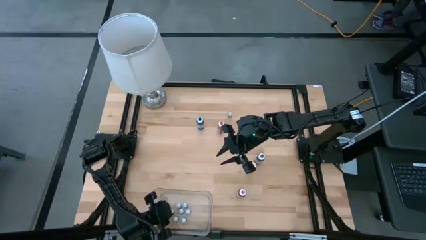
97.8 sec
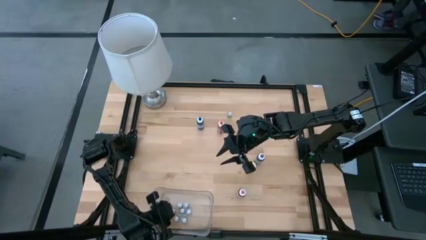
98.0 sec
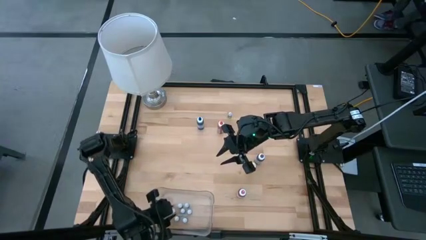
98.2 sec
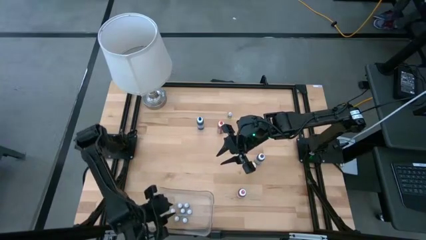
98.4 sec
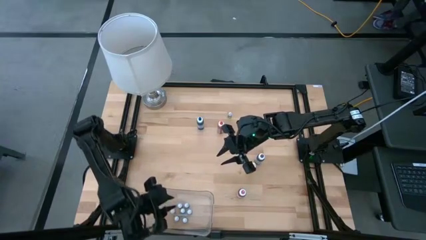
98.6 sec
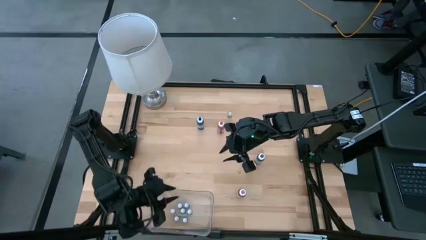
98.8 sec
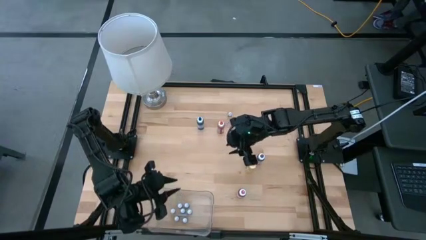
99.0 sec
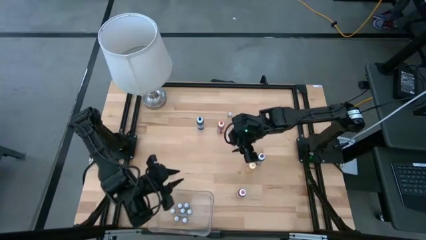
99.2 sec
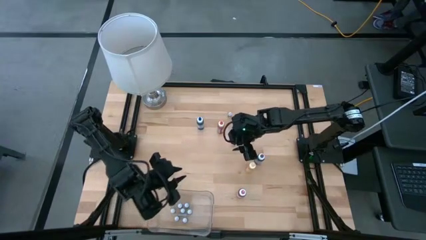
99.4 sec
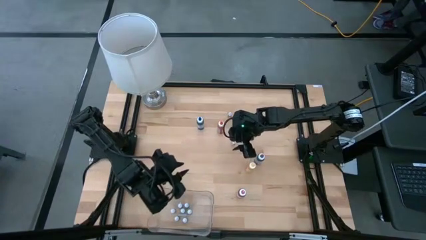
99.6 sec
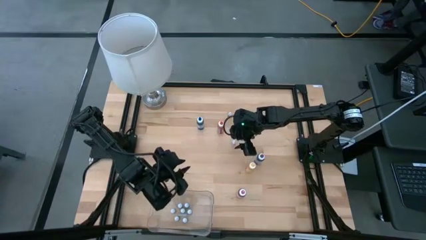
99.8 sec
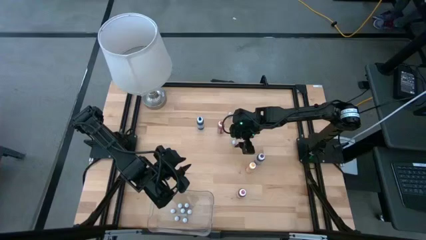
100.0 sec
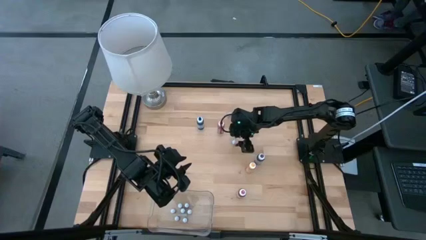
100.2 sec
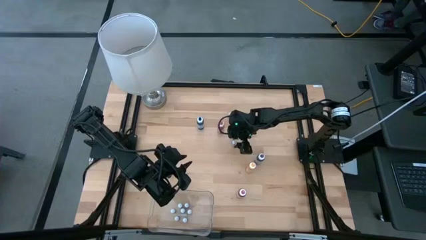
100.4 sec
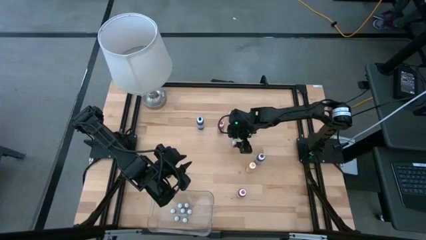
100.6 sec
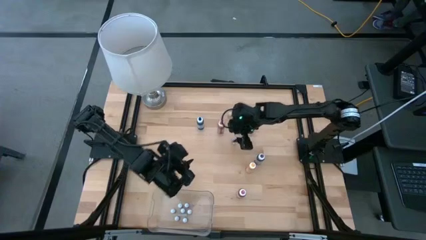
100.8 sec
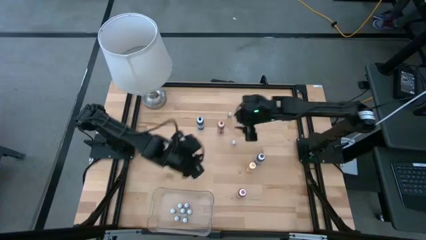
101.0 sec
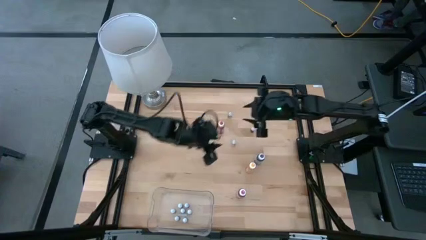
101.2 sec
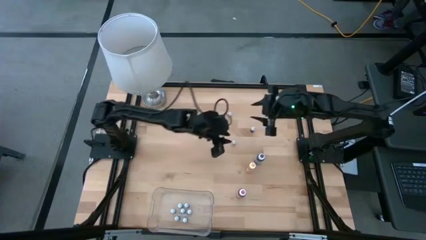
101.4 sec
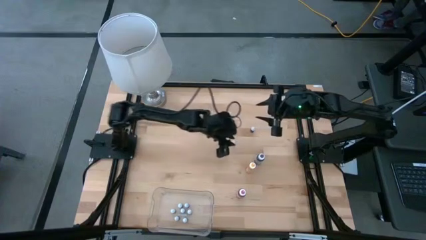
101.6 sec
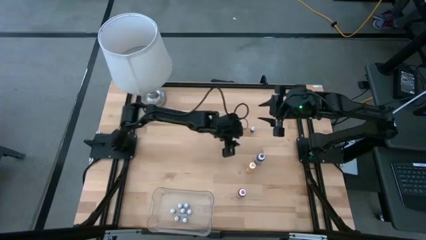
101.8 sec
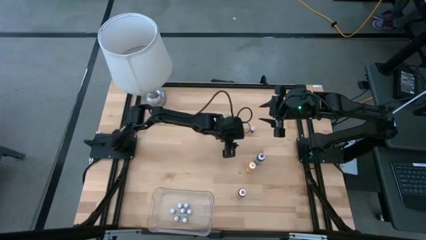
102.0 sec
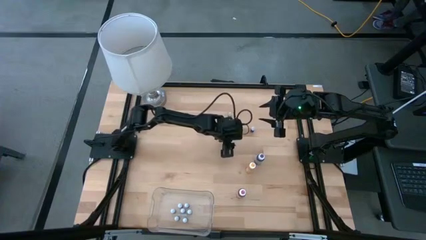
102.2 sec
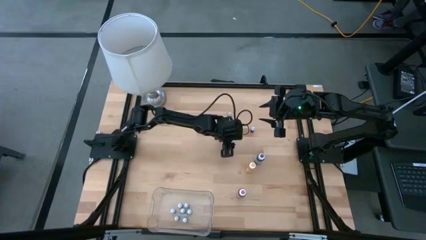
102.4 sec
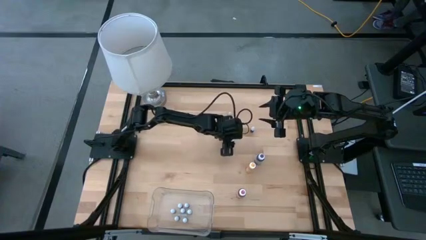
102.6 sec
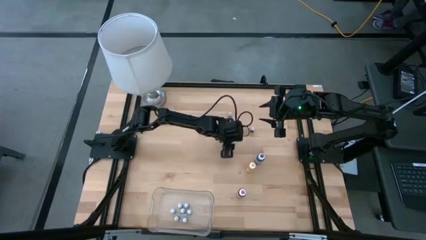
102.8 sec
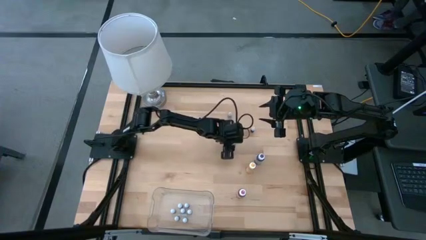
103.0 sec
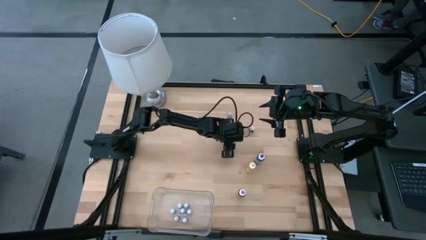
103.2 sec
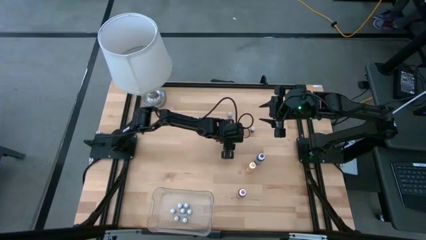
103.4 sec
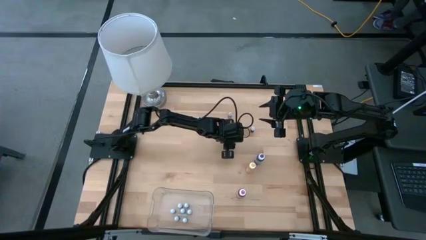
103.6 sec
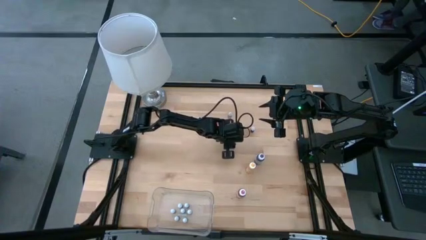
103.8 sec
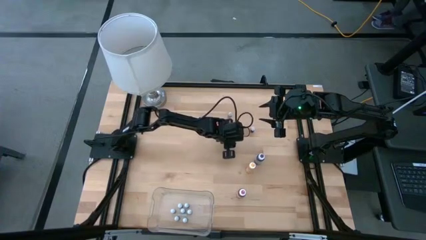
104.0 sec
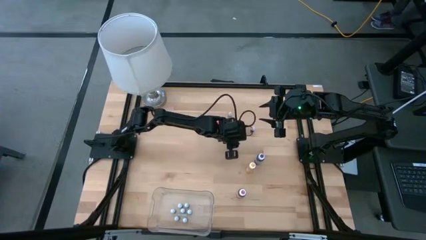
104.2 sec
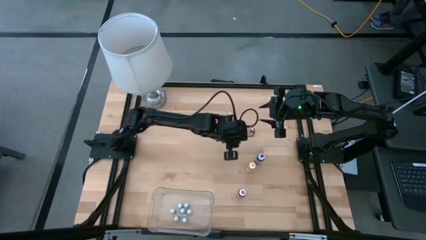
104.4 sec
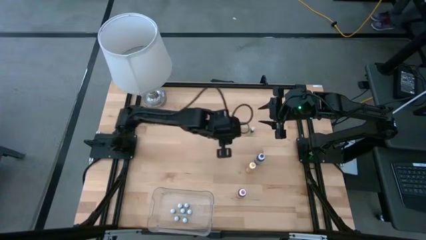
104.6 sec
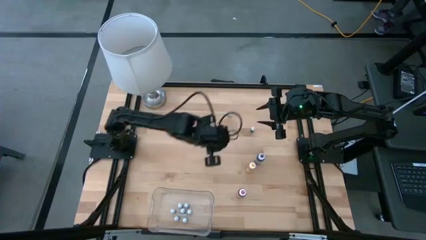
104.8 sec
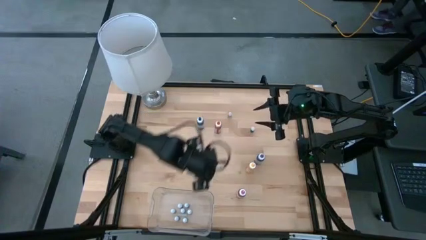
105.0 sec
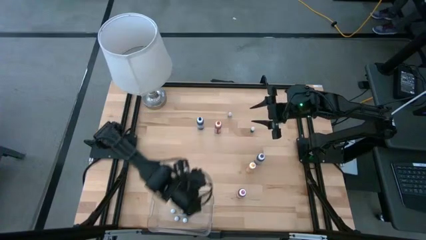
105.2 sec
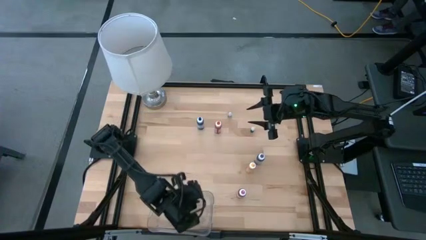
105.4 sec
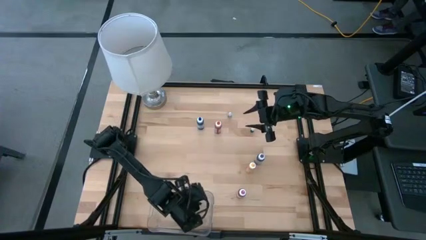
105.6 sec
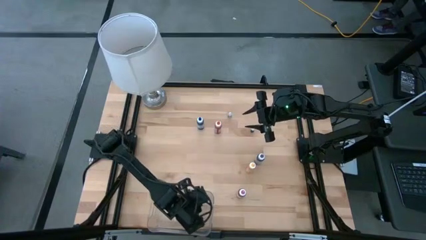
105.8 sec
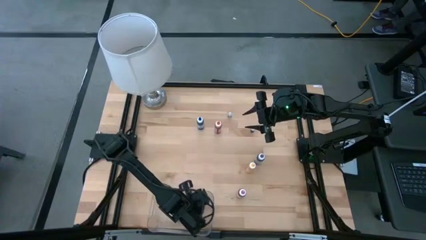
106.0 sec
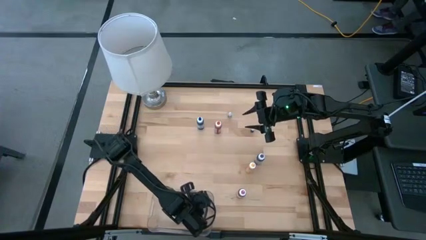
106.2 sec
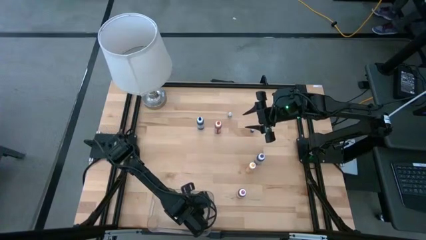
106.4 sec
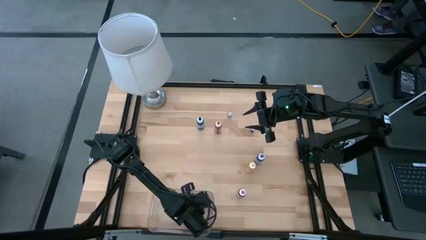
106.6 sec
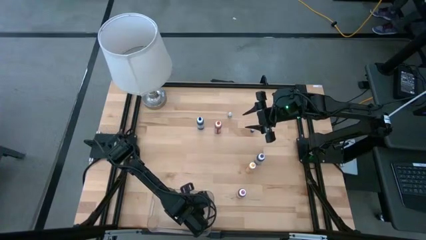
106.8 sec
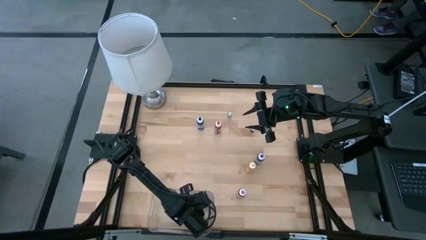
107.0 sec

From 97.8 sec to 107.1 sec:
Task: Pick & Place food coloring
Put the small blue food coloring bottle into the bin

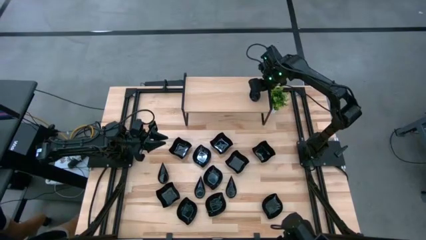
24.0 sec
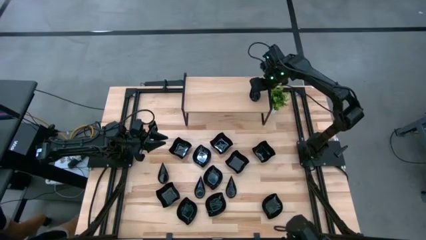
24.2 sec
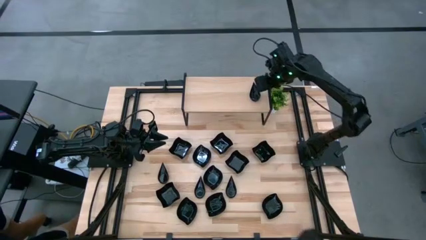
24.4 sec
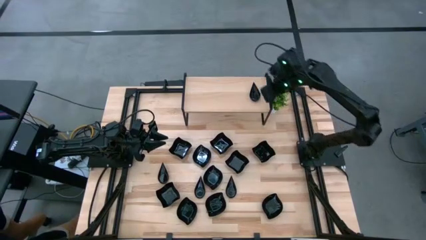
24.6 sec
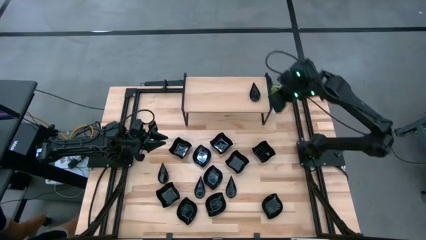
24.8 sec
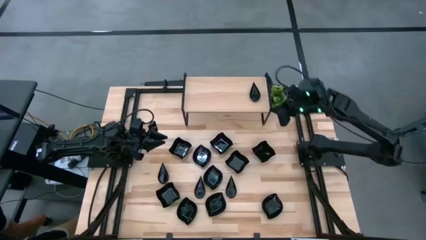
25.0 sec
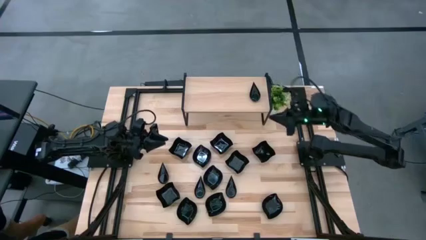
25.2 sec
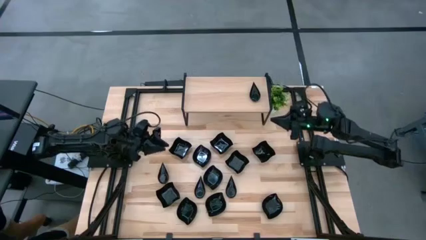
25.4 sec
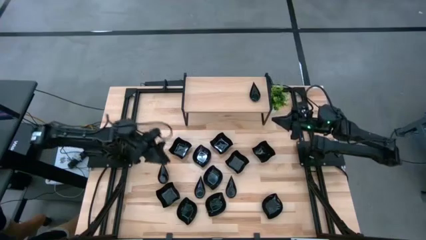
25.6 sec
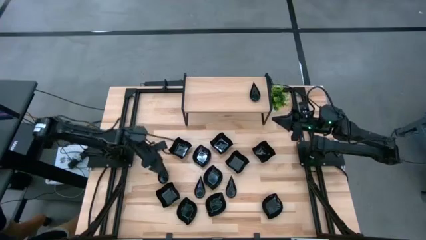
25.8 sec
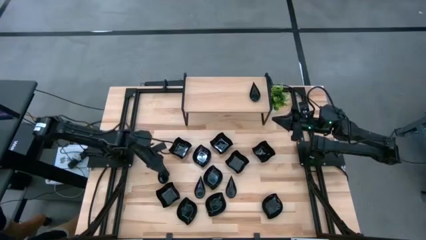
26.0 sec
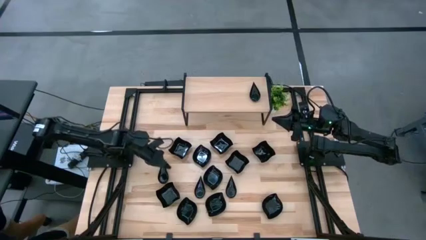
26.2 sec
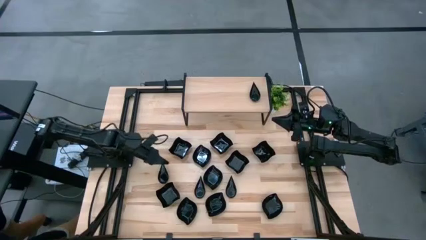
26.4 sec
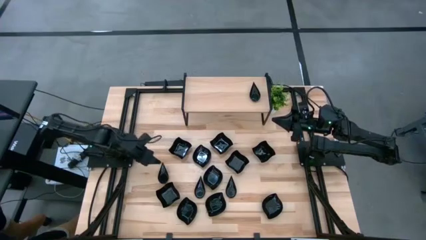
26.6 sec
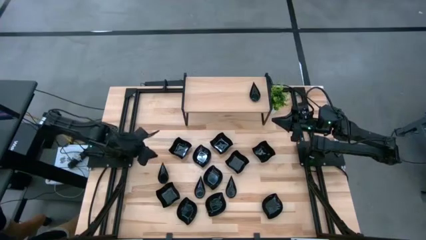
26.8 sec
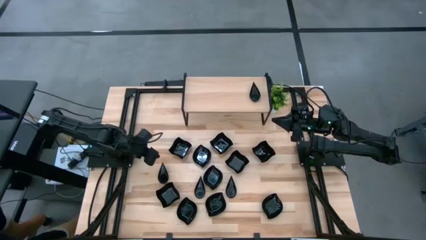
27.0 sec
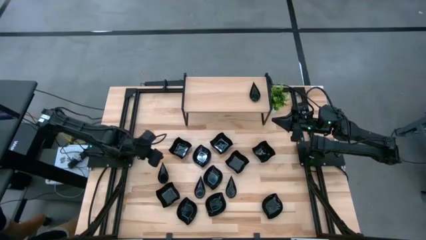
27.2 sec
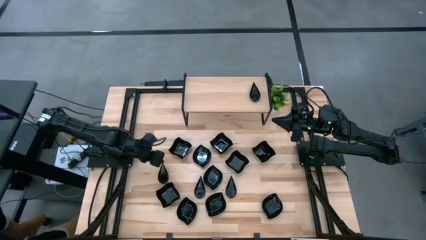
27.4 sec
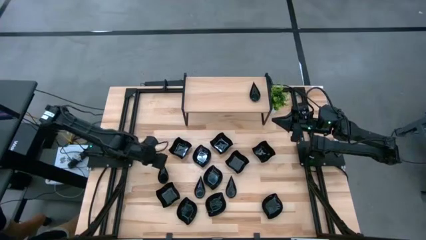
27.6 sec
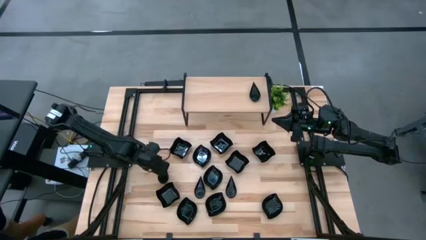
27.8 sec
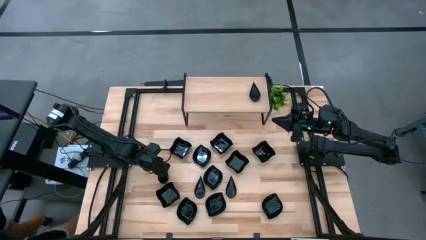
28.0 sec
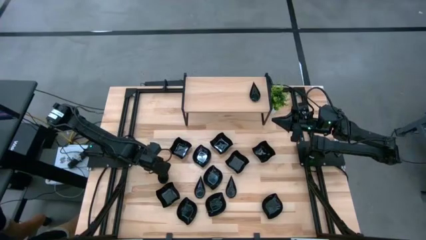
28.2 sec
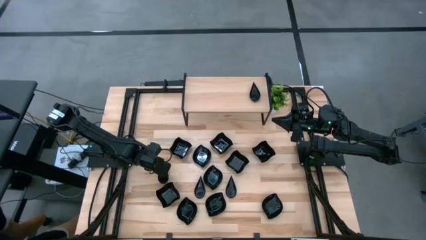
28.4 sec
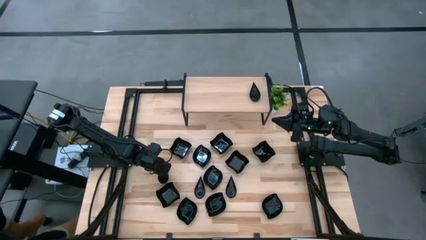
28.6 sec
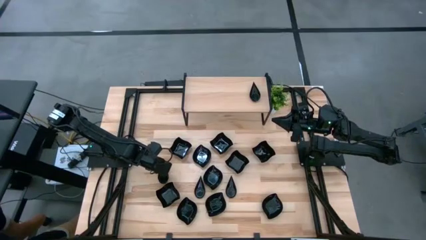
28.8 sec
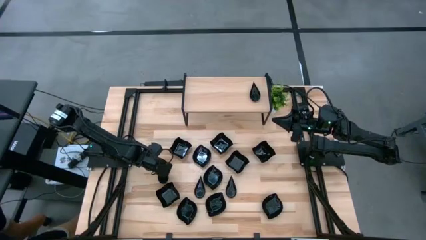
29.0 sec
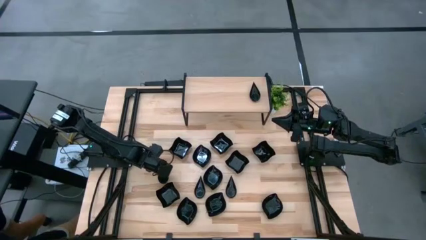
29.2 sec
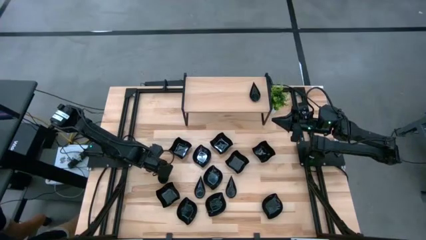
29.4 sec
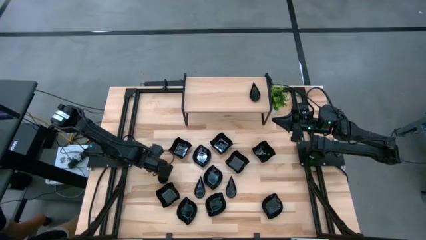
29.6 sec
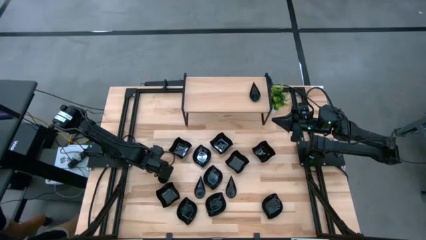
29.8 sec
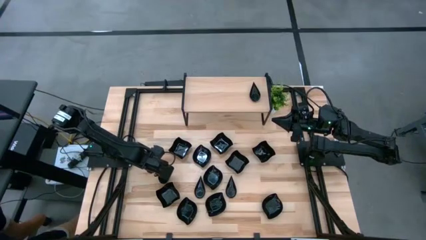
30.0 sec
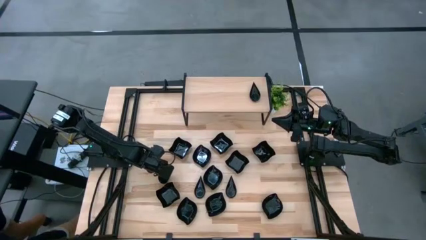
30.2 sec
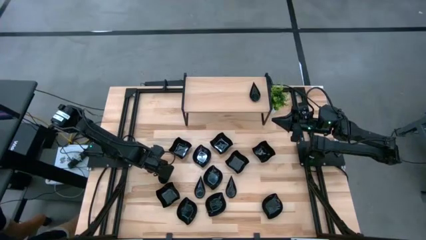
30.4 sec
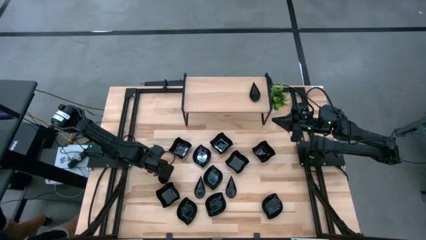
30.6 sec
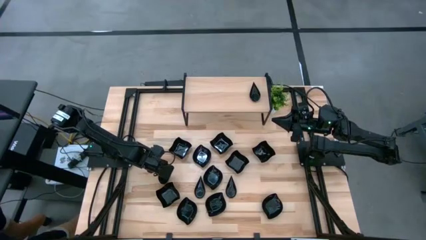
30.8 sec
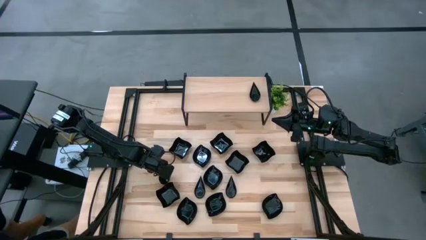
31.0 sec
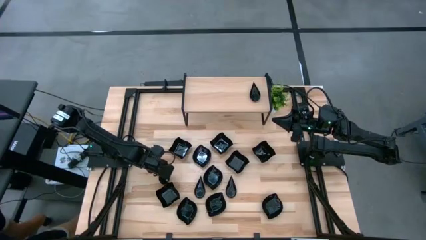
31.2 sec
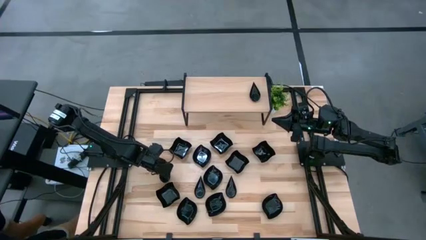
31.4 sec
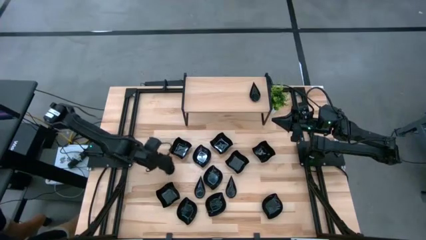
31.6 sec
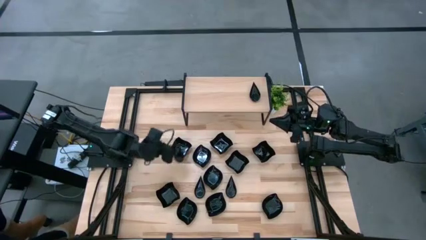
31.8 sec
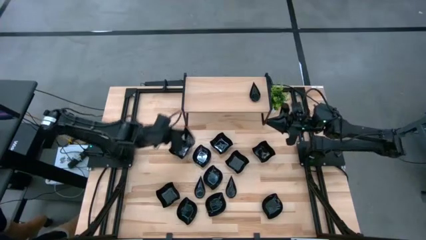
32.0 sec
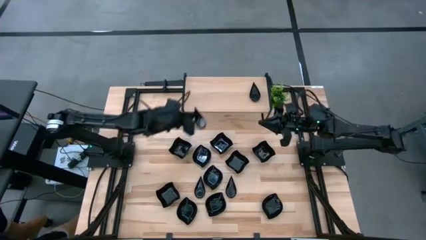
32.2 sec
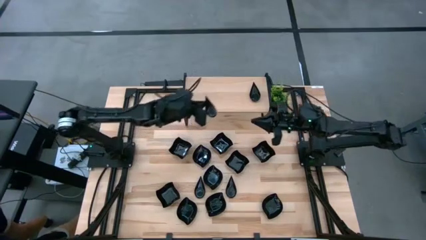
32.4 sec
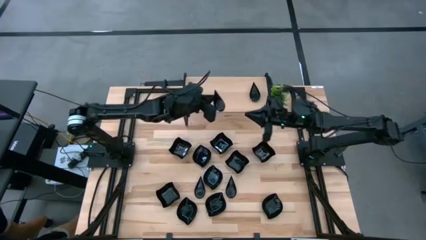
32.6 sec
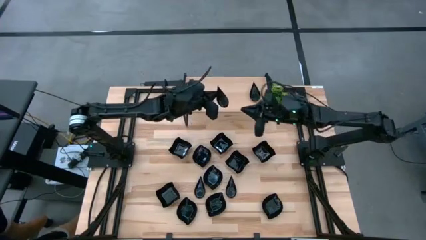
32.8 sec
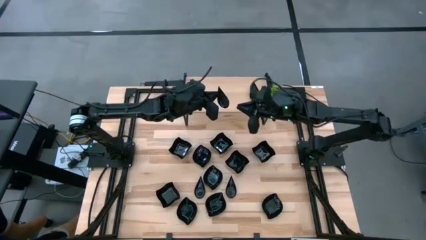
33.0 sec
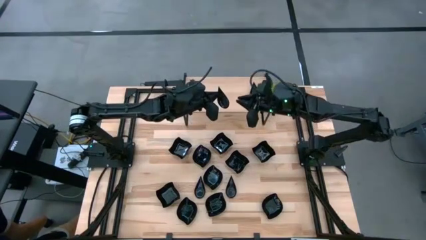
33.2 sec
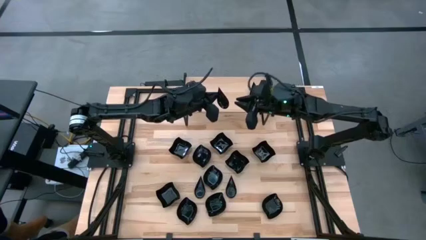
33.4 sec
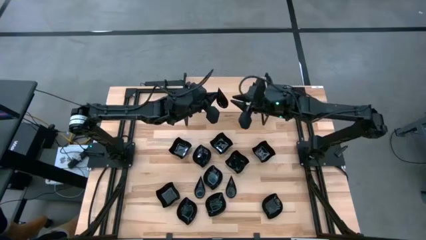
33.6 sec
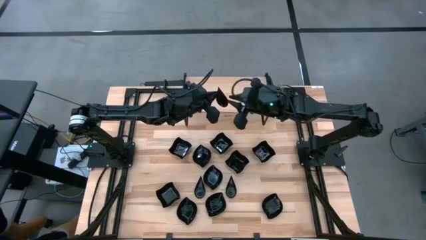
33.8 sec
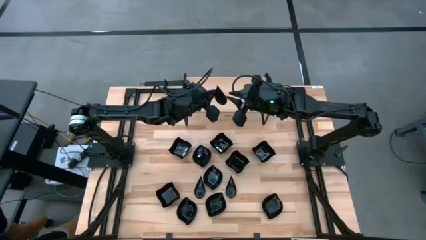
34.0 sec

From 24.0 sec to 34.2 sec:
Task: Pick & Place Mini shaped plates
Stack the left black drop shaped plate on top of the other black drop shaped plates on the shelf
